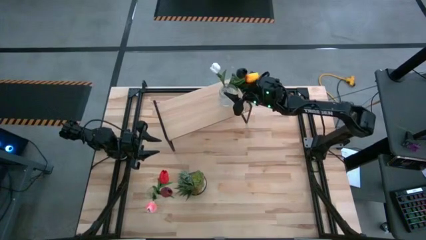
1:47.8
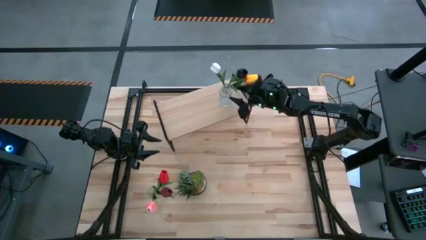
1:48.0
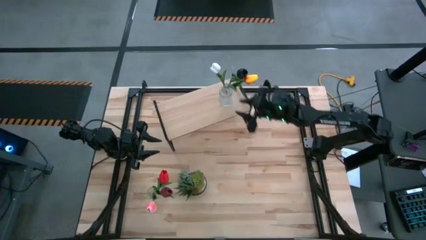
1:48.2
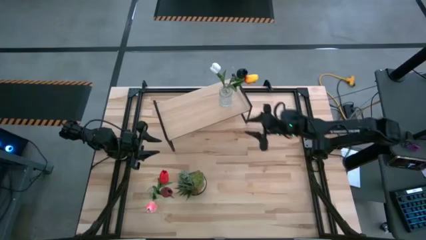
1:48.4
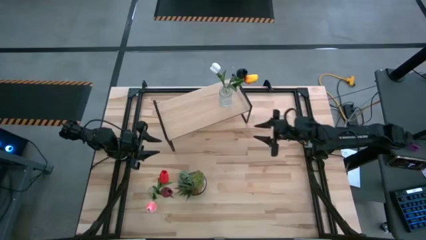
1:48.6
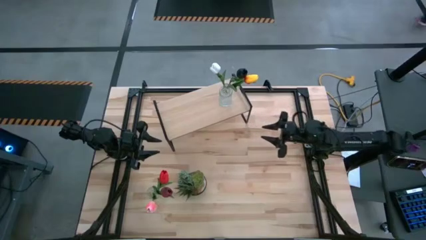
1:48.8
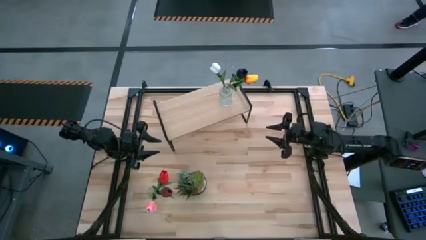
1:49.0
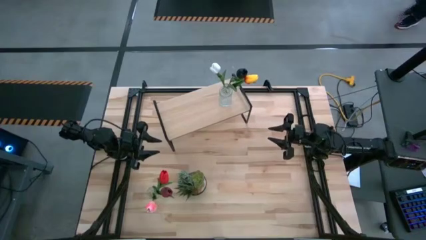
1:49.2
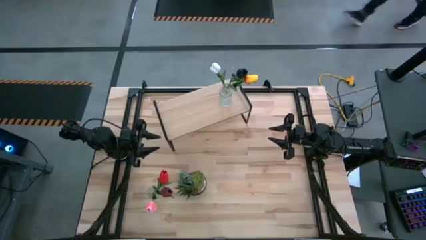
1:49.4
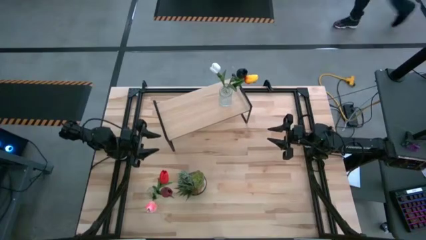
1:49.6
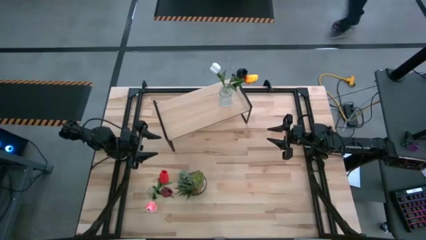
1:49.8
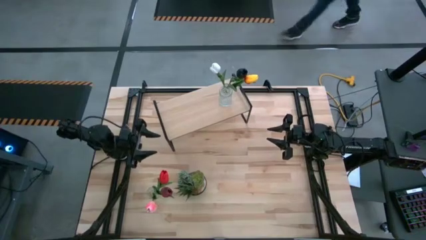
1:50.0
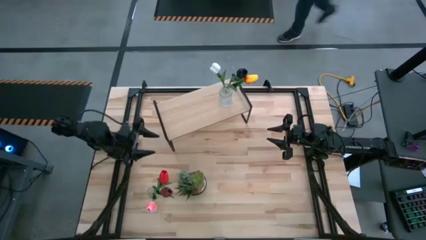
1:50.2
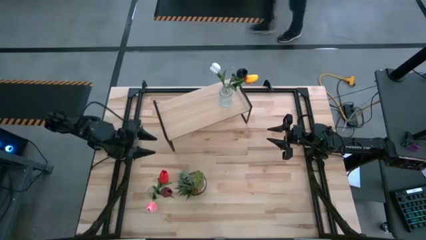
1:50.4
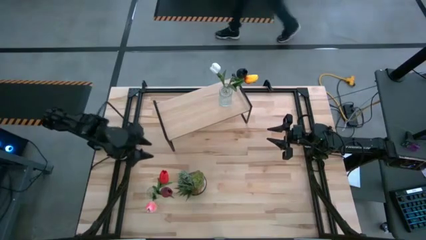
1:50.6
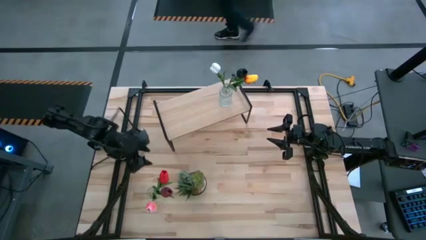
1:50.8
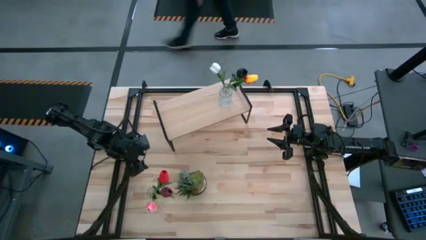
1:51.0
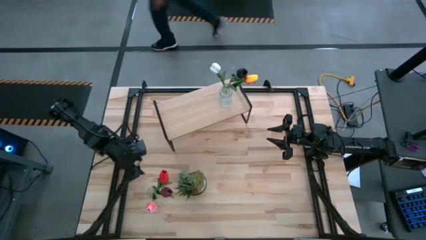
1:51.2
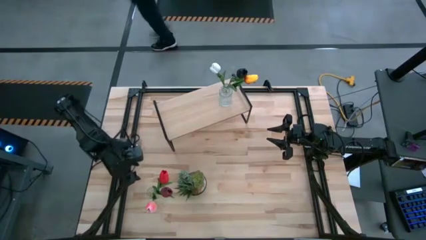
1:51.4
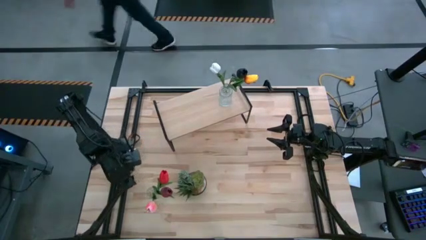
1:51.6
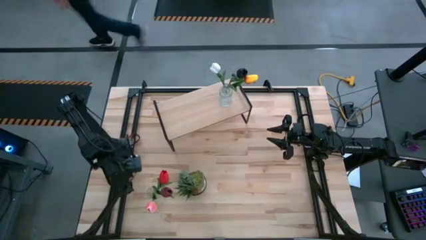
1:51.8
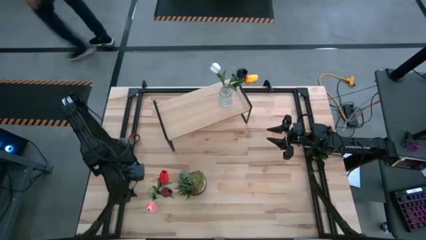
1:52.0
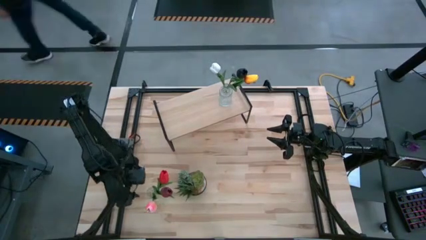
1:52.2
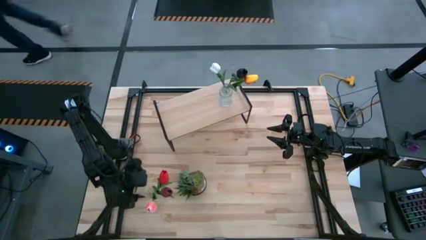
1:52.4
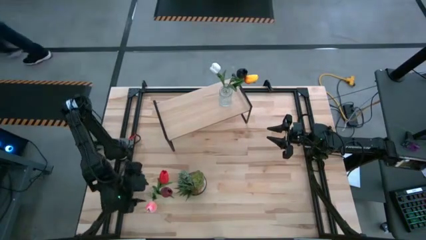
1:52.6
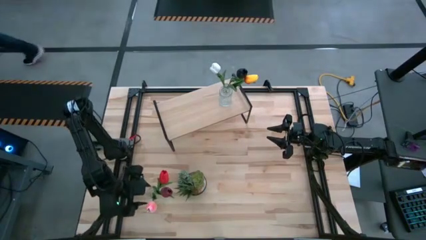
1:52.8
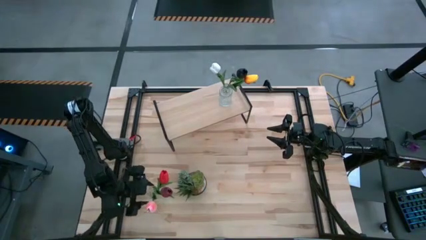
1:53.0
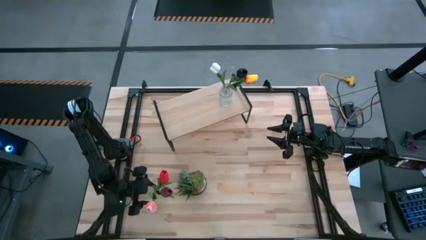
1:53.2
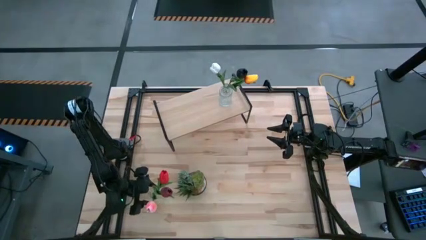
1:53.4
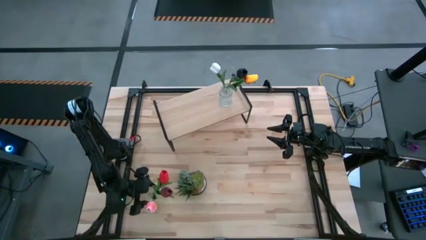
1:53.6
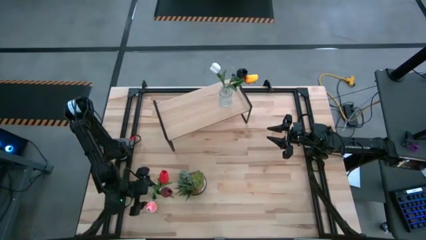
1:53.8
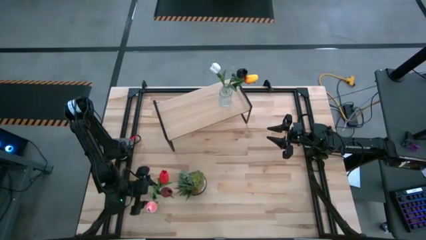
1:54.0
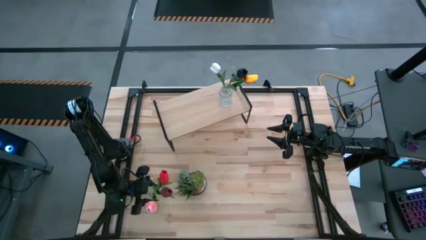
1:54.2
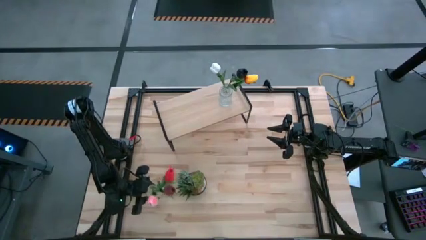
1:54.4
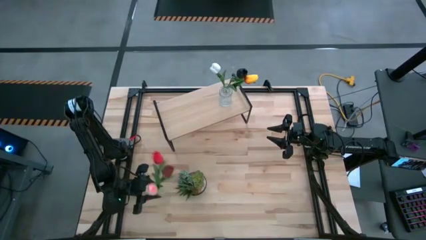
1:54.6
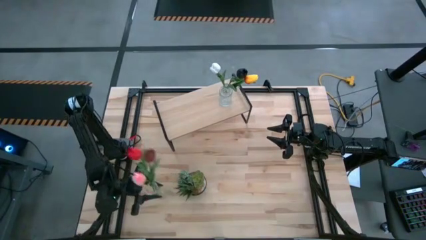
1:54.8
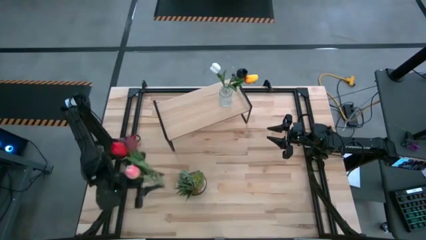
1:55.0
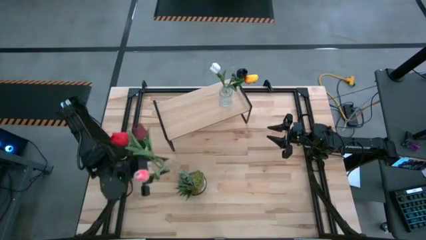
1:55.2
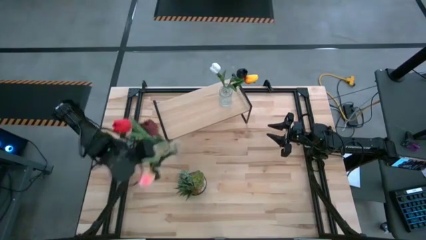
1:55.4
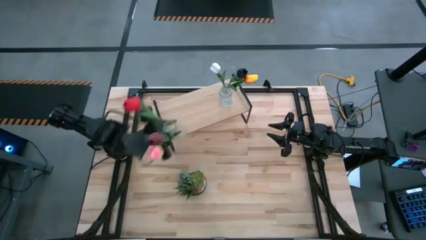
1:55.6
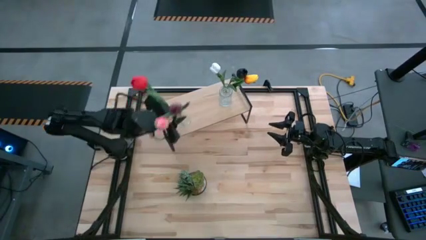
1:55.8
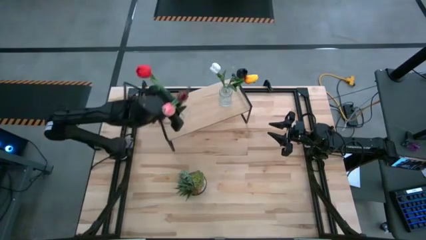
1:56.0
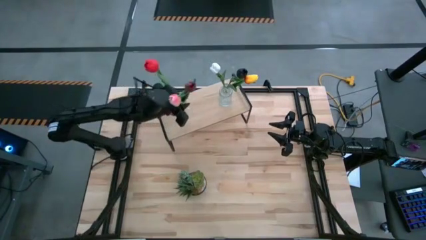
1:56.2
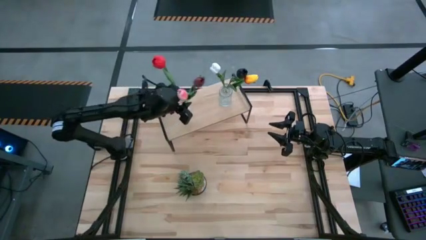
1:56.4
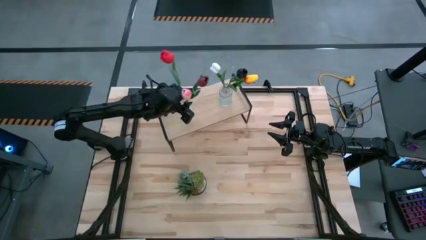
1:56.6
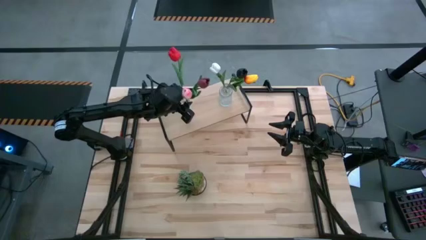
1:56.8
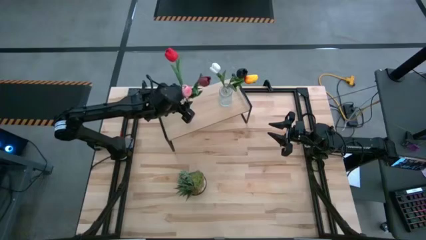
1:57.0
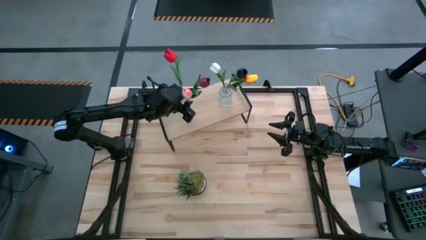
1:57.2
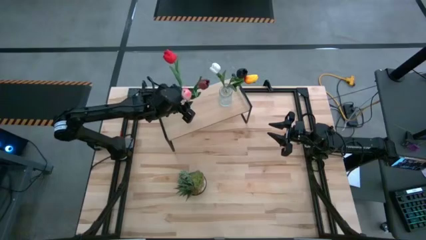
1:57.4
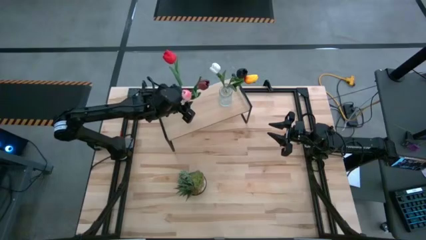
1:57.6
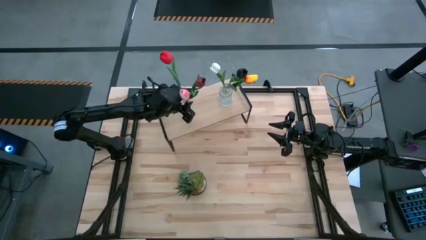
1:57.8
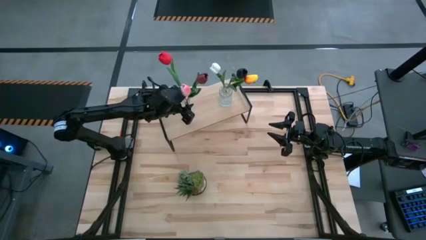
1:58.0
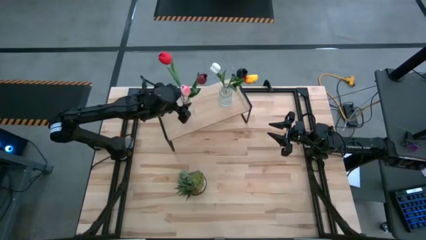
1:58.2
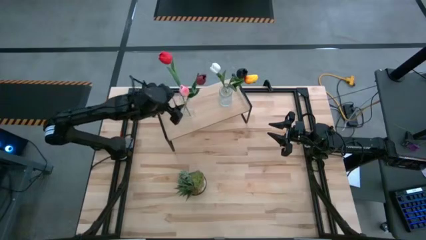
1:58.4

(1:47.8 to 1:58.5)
Task: Pick and place flowers into a vace then onto a shelf
Put the transparent vase on the shelf

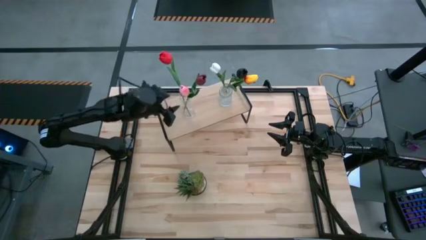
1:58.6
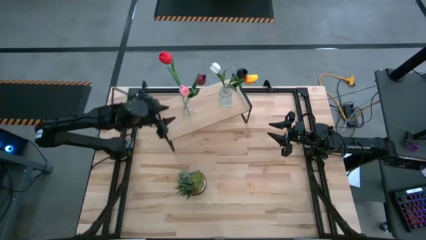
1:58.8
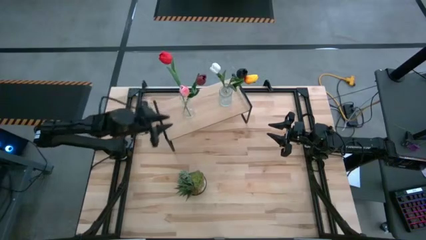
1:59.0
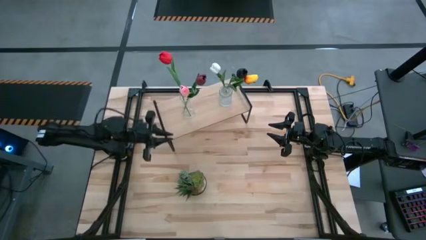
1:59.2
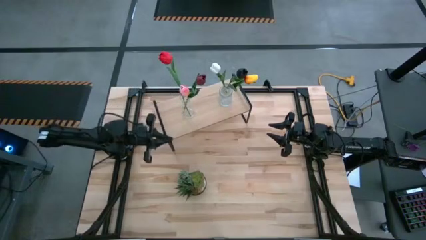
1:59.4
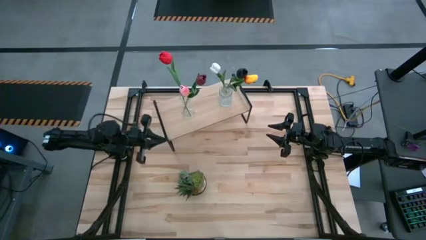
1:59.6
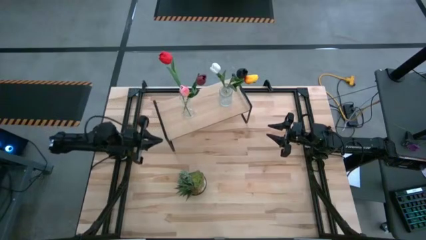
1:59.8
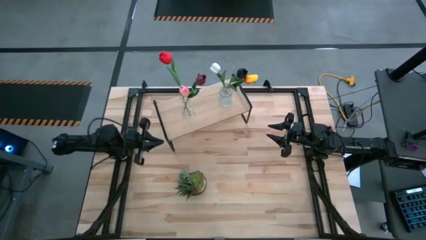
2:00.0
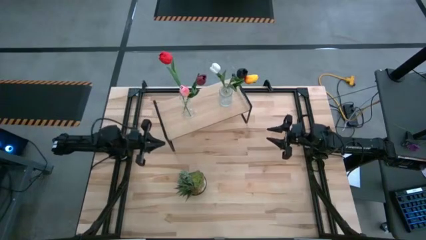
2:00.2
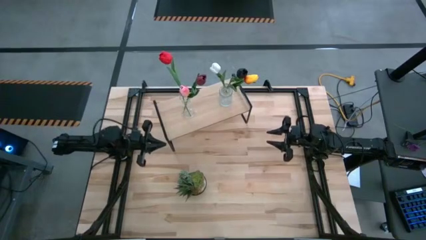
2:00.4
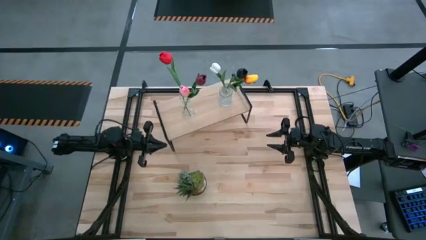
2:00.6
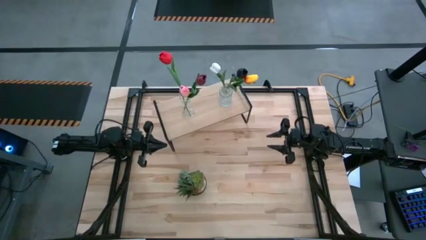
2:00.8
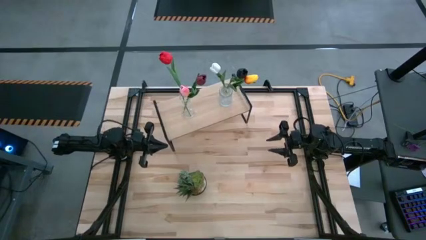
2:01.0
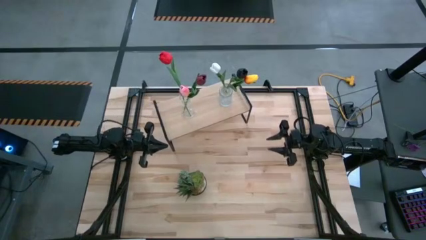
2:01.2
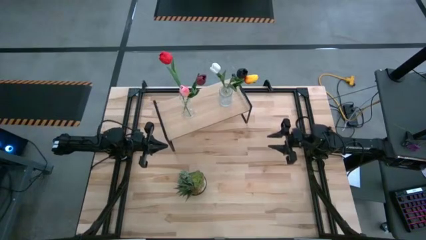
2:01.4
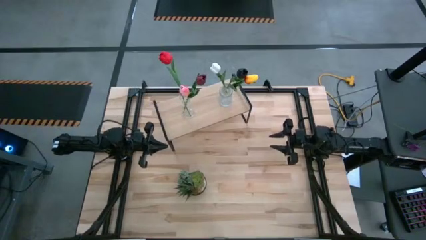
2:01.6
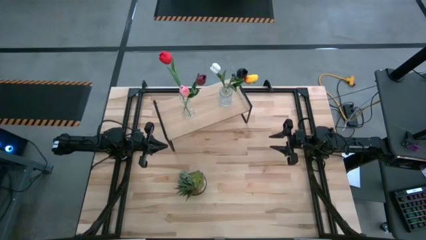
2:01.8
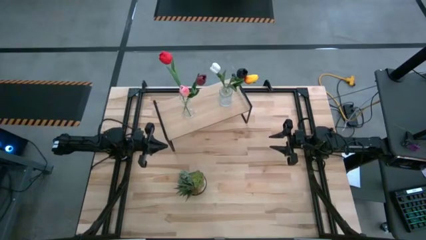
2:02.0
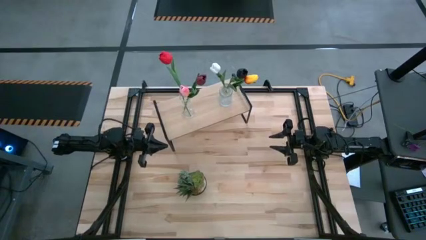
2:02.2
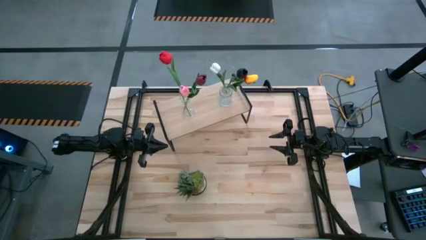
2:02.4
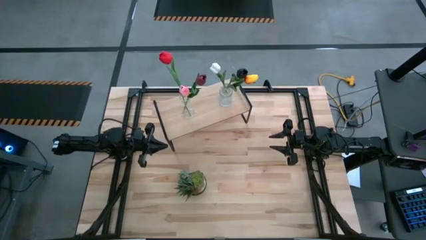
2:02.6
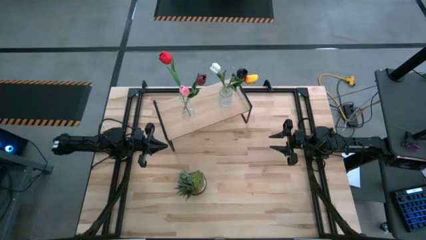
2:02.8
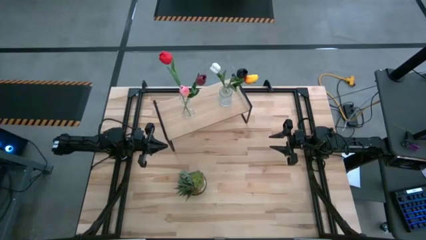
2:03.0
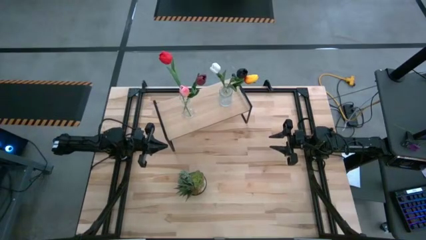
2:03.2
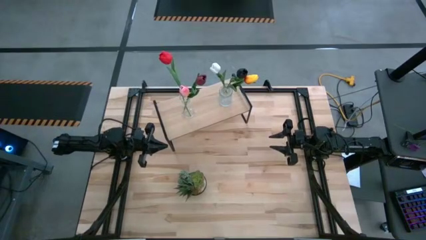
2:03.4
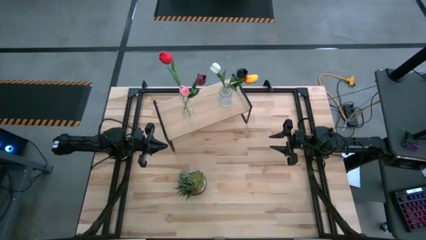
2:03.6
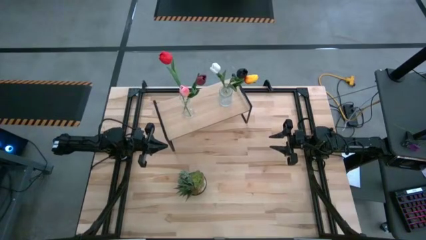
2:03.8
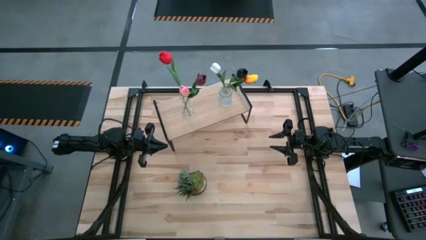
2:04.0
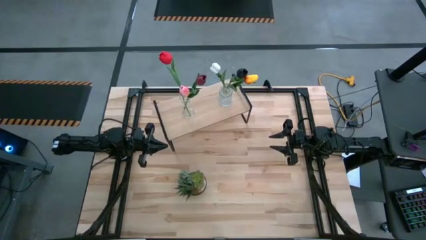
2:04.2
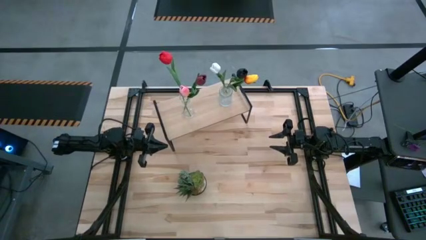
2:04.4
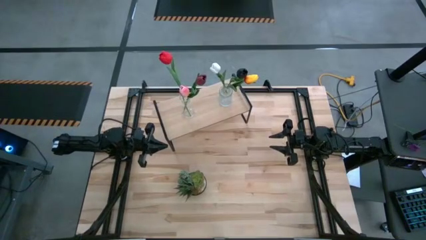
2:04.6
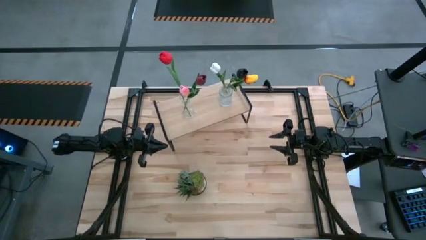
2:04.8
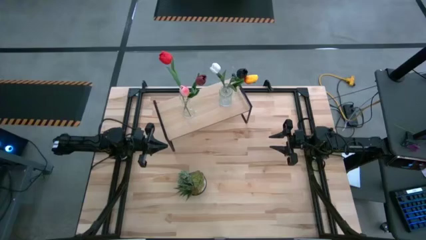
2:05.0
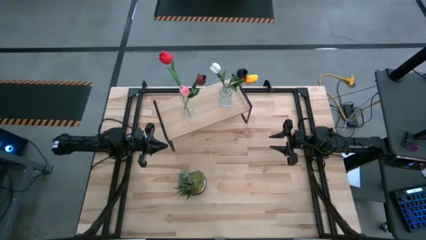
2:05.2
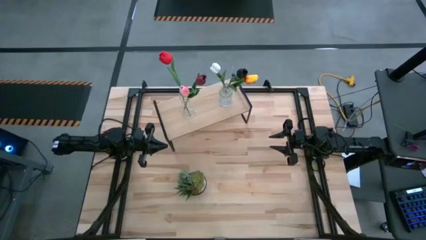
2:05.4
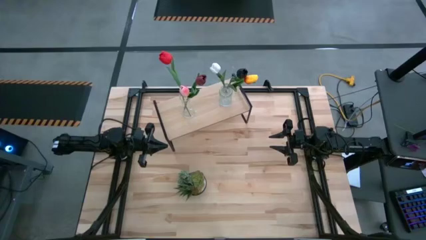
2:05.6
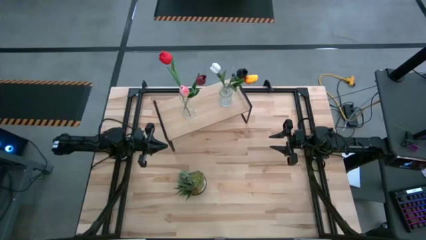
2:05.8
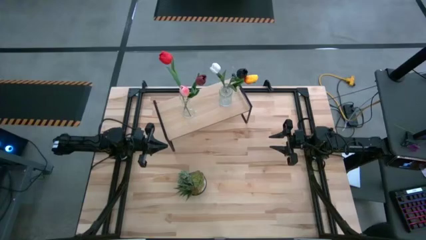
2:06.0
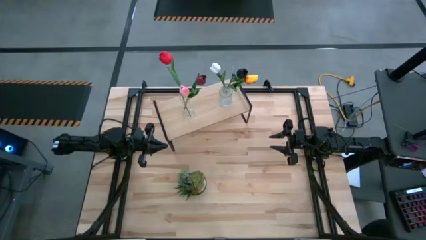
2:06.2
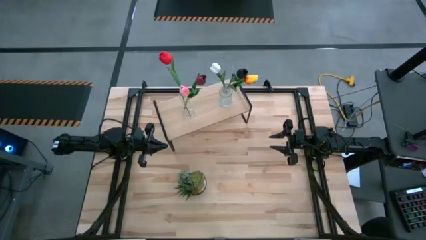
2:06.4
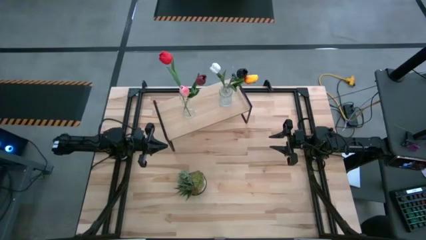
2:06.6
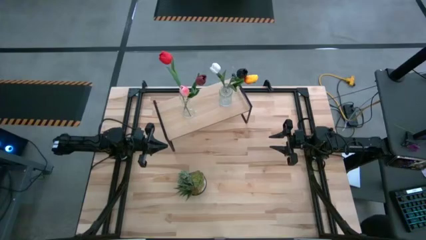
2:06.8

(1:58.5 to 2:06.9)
Return to Home Position
